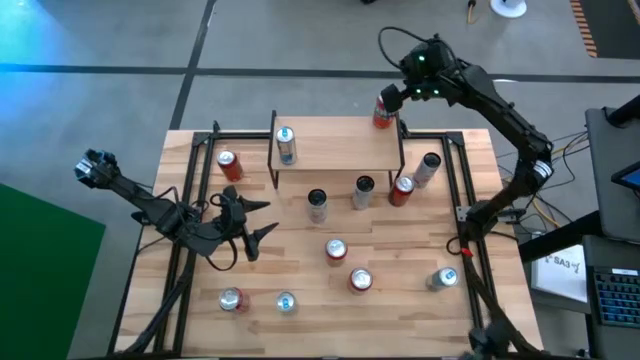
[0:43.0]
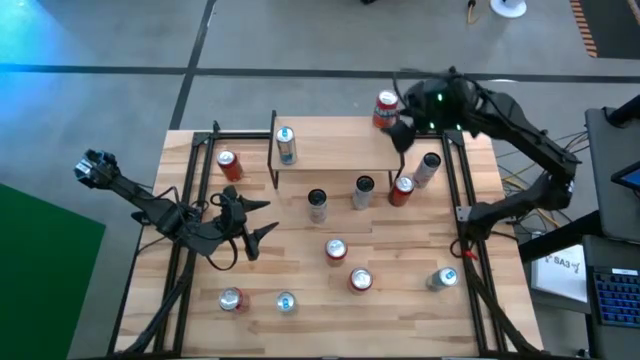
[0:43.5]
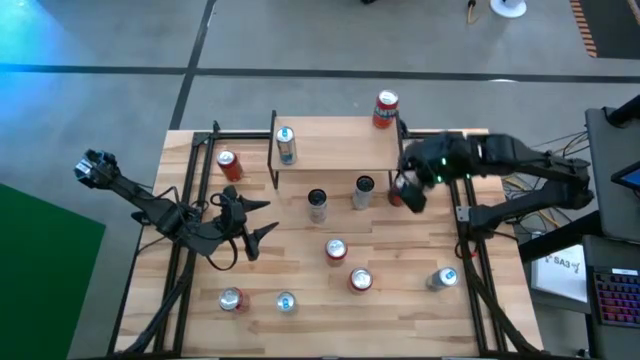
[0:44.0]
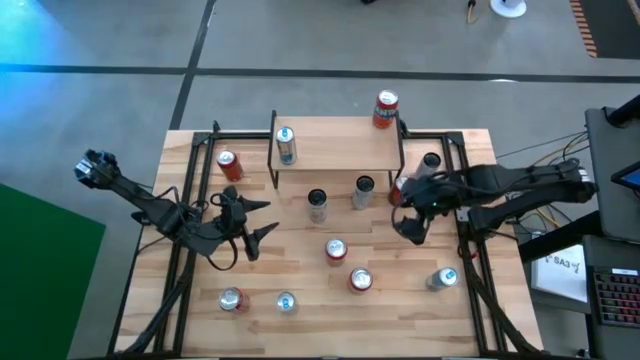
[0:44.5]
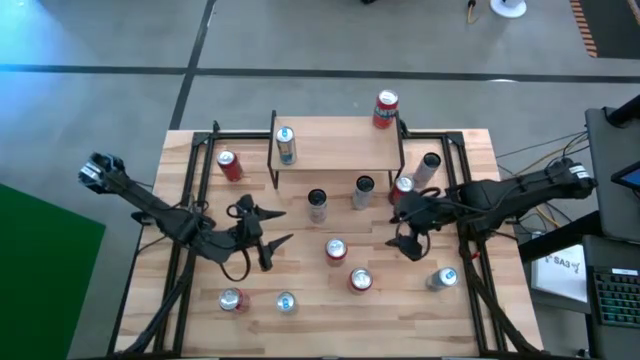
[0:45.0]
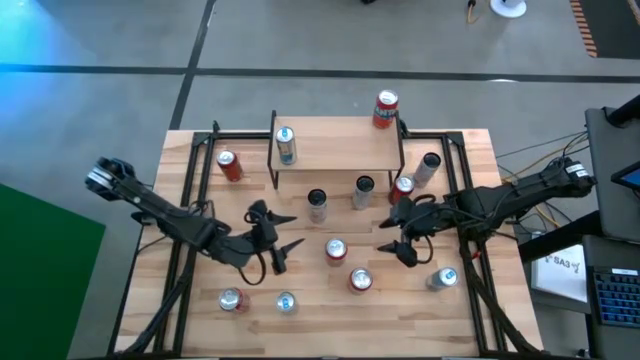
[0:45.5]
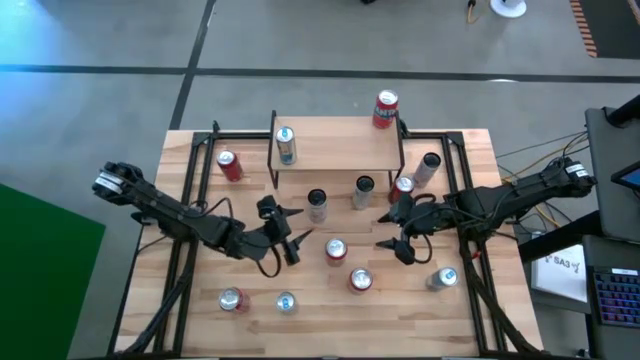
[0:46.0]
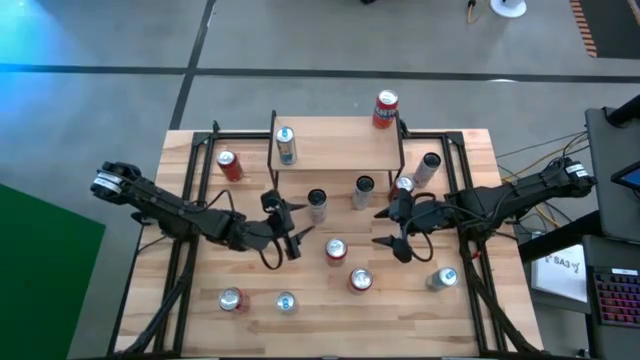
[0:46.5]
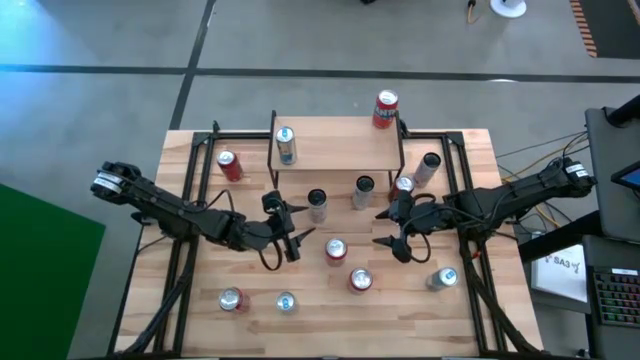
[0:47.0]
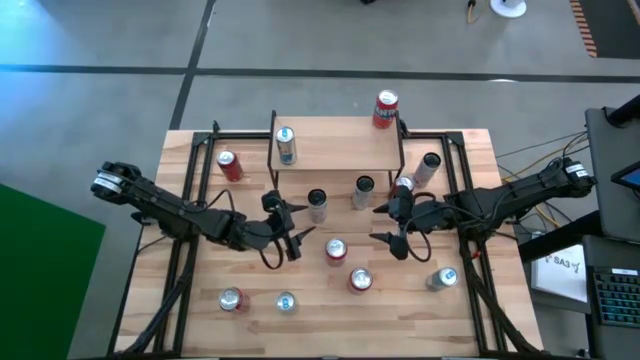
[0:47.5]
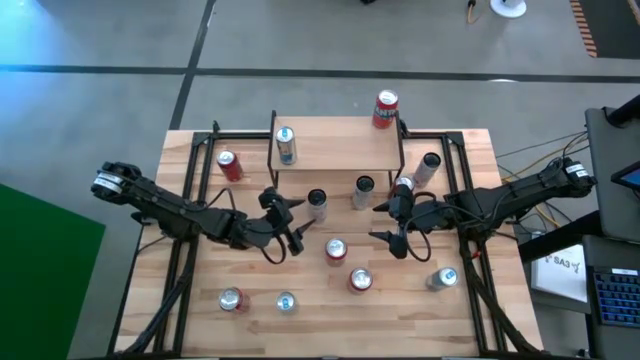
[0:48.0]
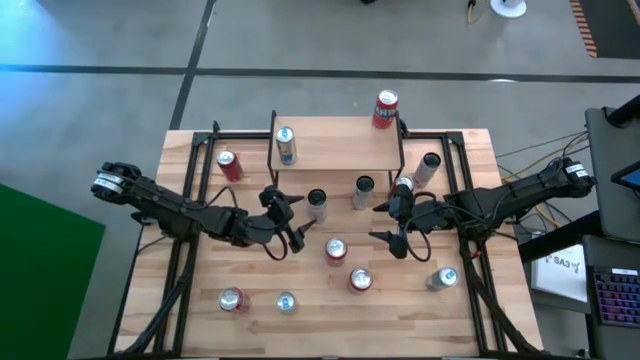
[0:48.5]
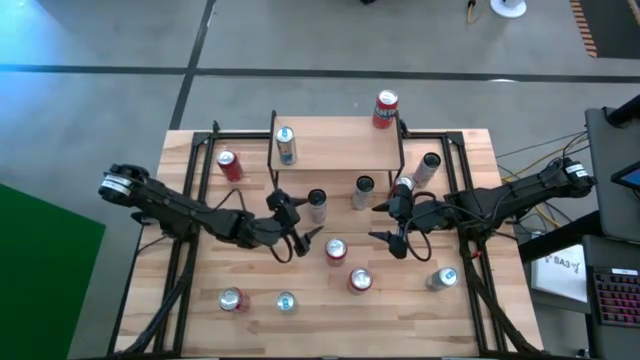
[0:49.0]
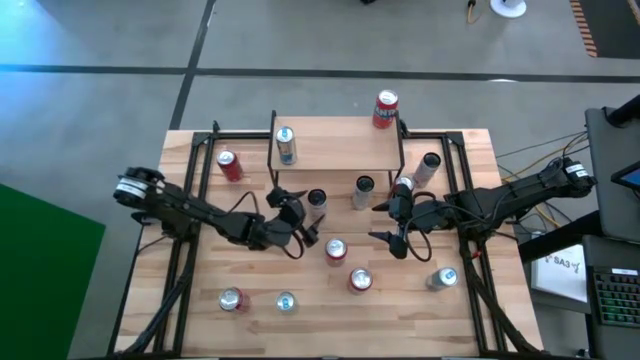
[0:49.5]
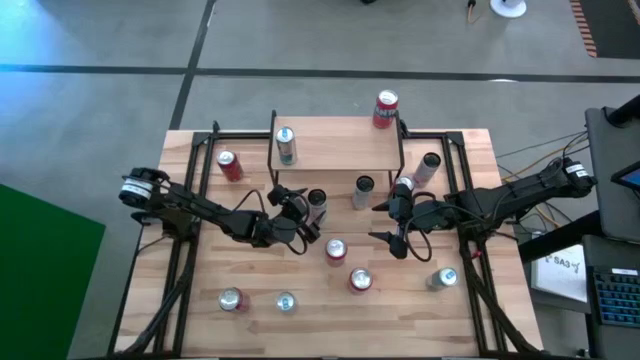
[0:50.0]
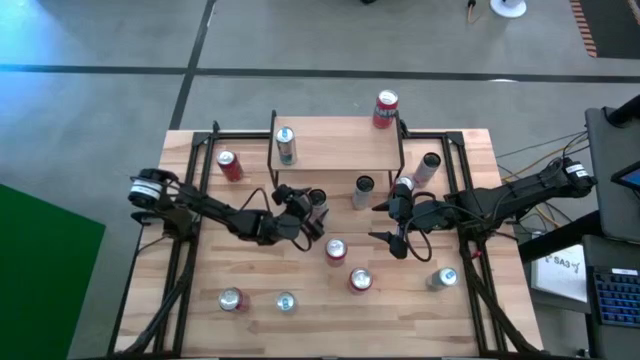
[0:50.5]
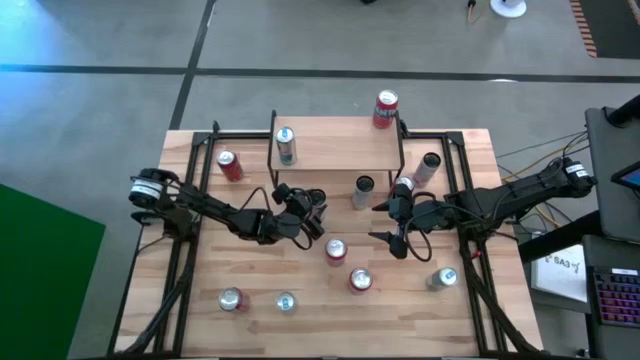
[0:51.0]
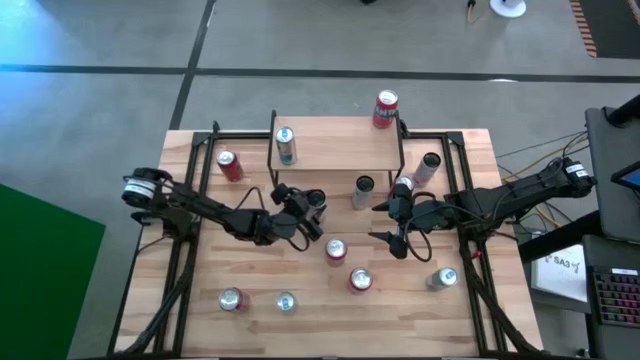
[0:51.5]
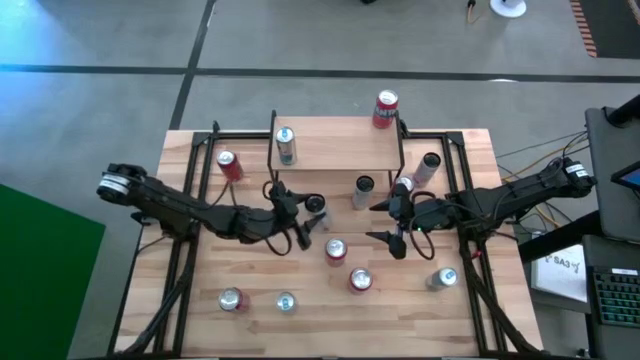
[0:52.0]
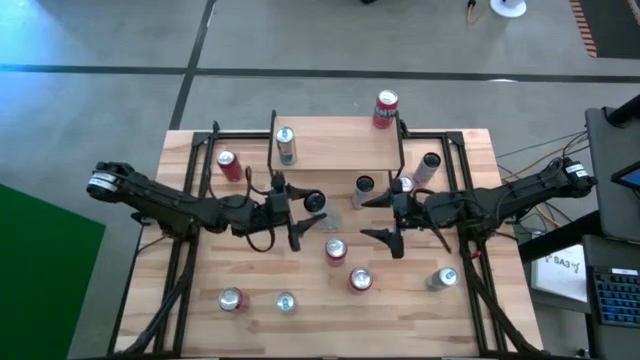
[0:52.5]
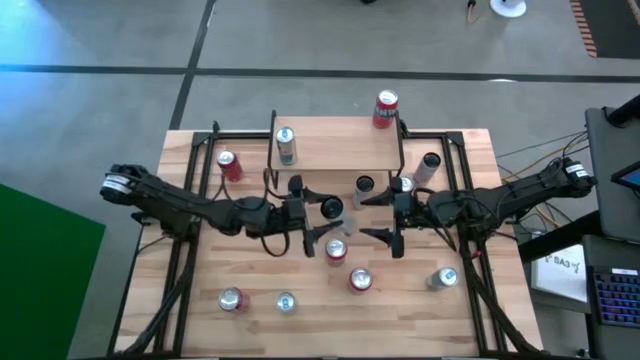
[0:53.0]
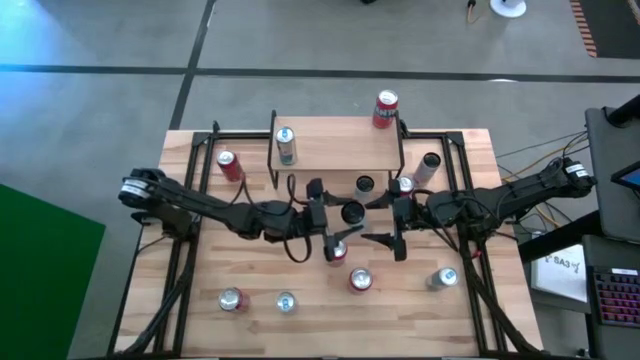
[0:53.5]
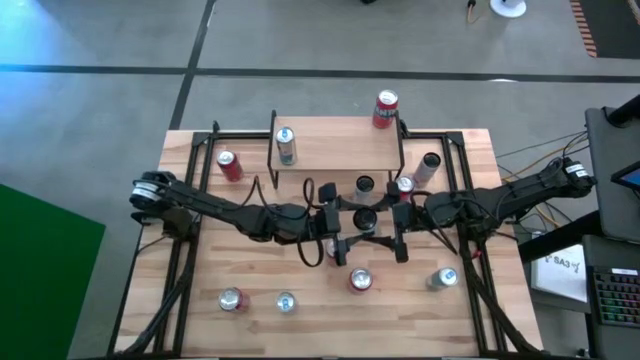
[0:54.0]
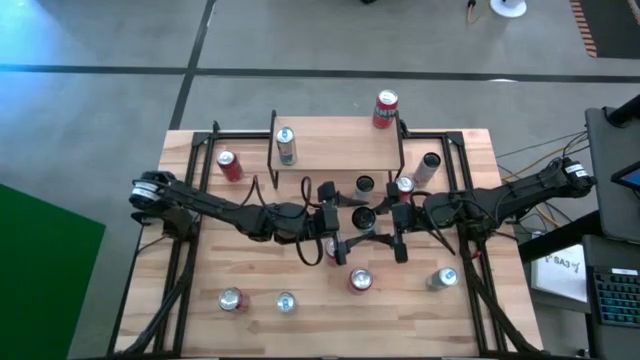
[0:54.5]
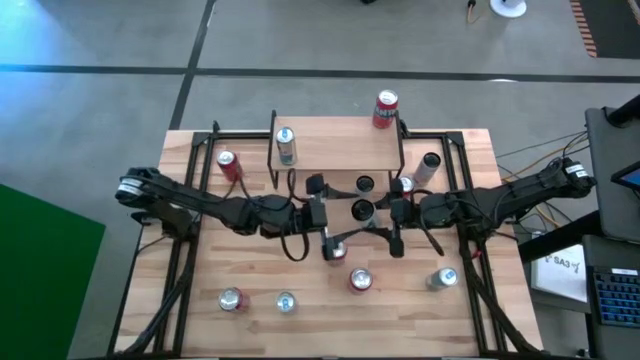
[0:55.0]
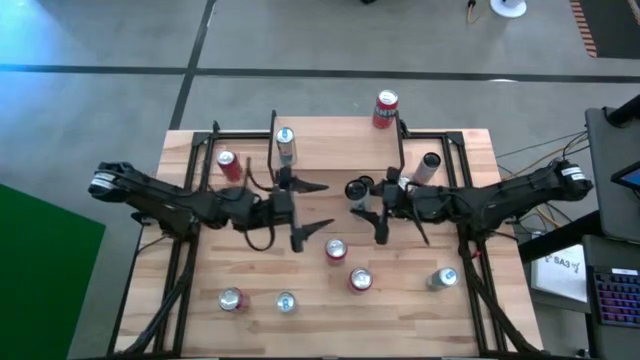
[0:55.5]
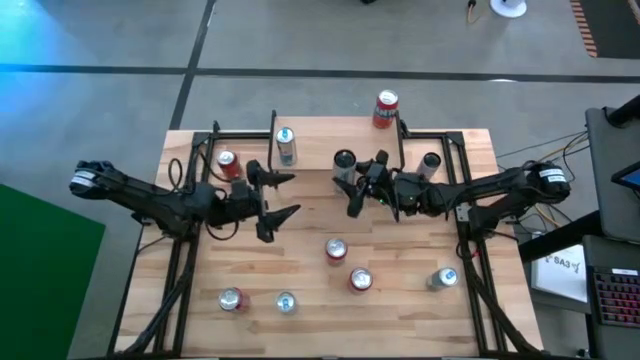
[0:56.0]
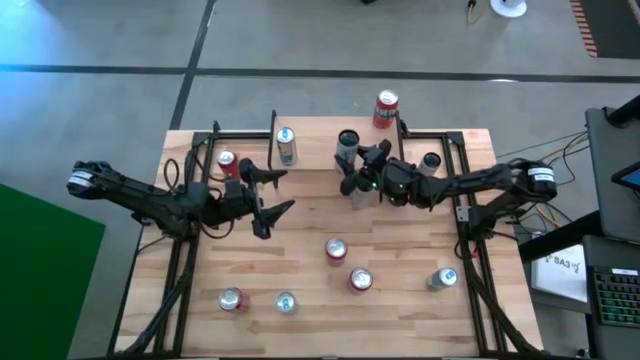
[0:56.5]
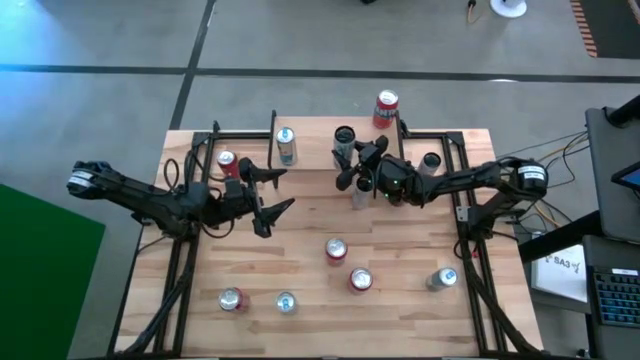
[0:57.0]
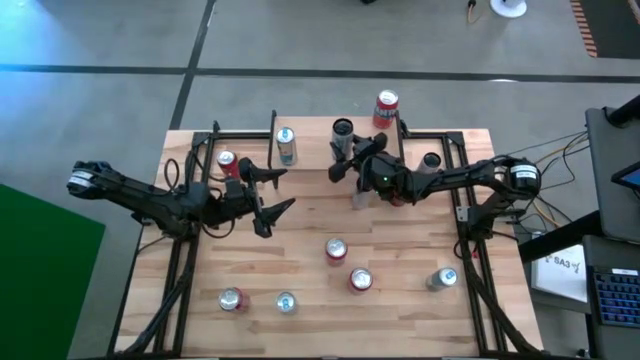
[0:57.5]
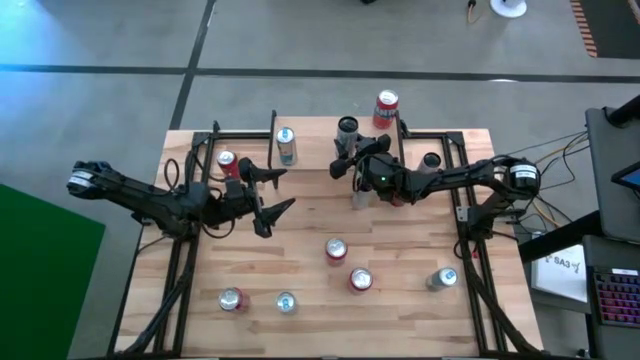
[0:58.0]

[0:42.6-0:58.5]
Task: Place canned beverage on shelf
Put the left white pink soda can on the shelf

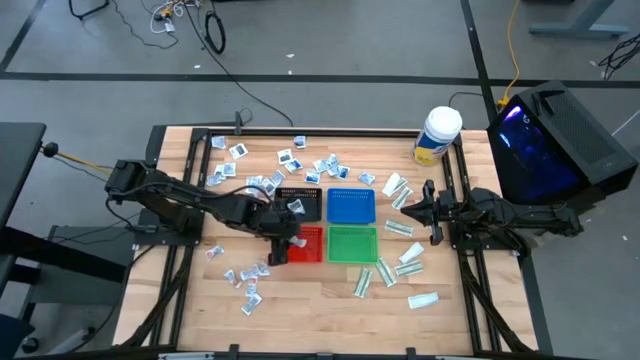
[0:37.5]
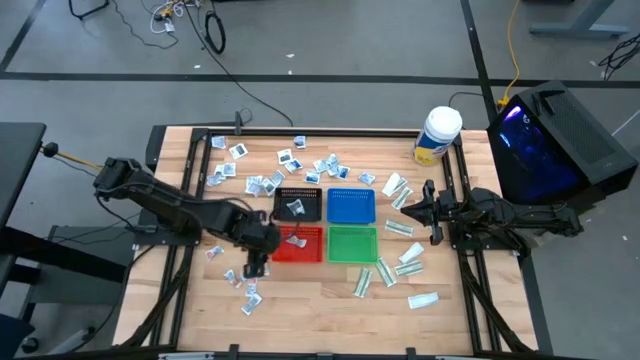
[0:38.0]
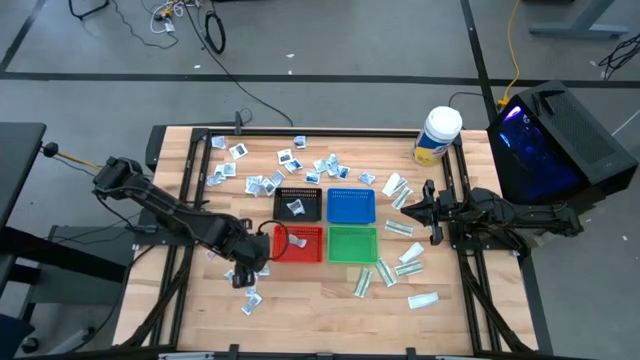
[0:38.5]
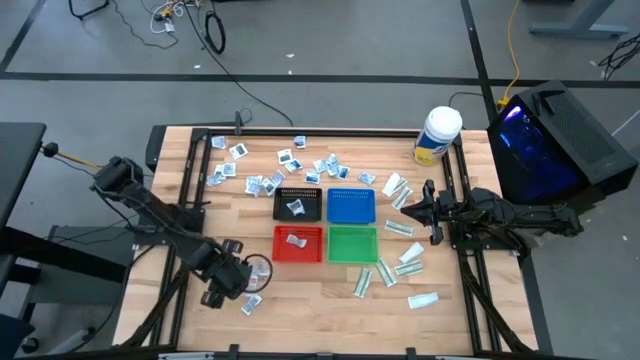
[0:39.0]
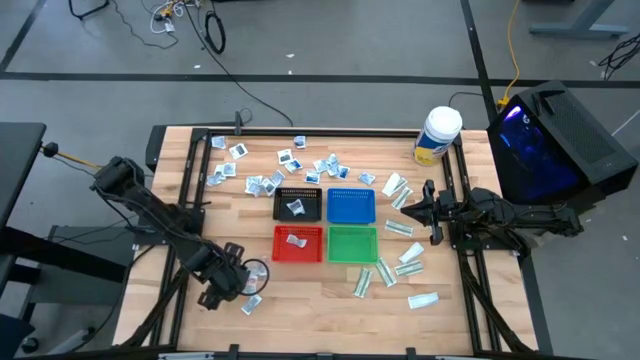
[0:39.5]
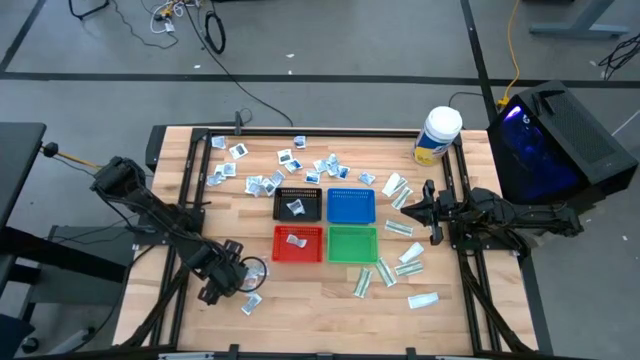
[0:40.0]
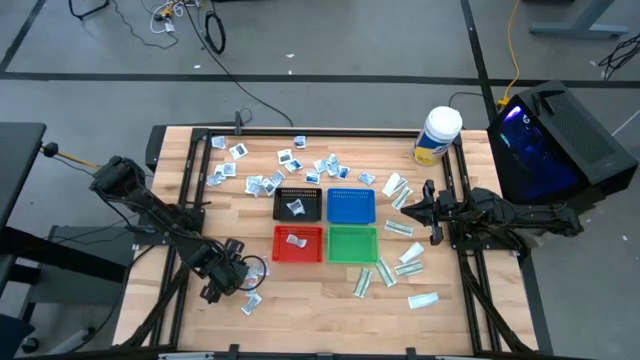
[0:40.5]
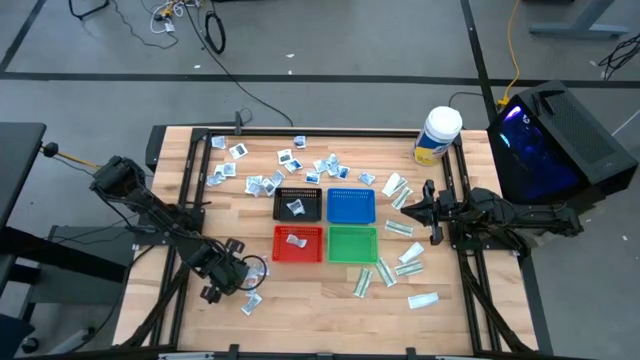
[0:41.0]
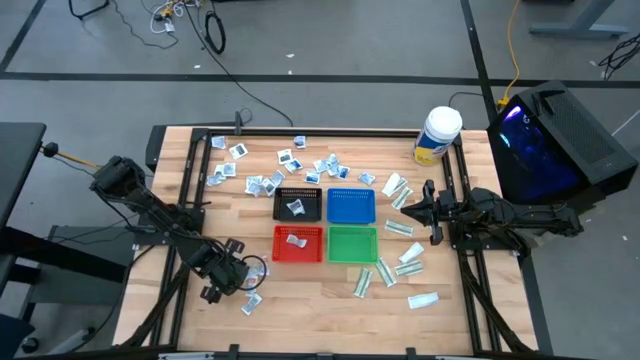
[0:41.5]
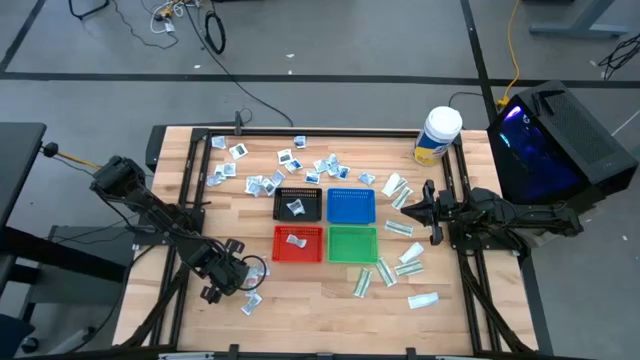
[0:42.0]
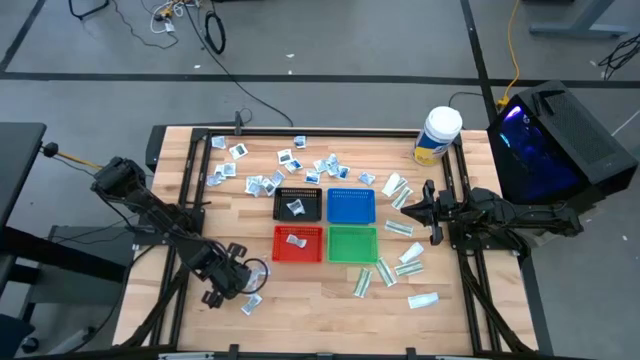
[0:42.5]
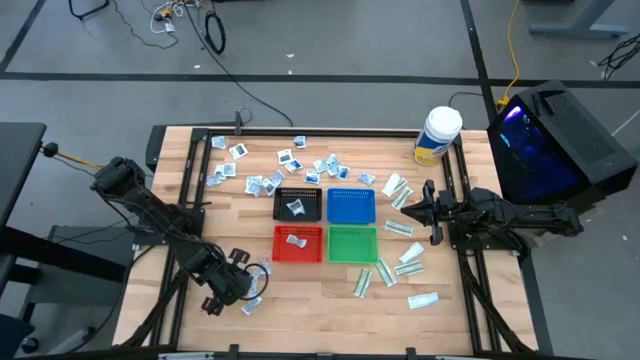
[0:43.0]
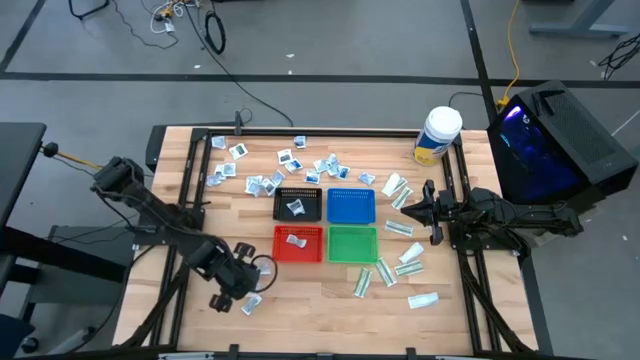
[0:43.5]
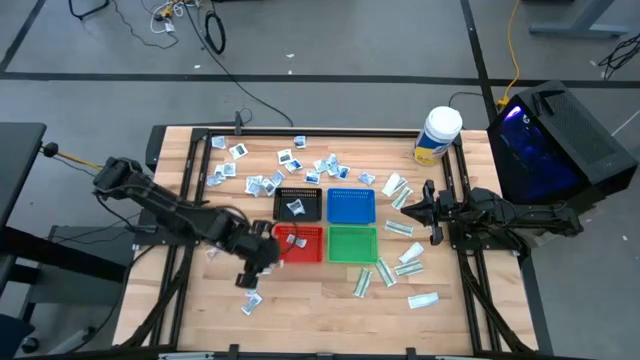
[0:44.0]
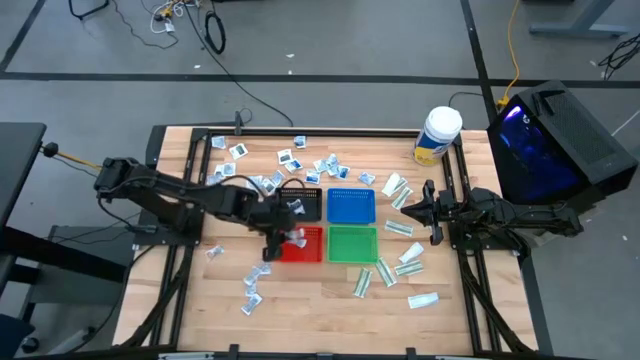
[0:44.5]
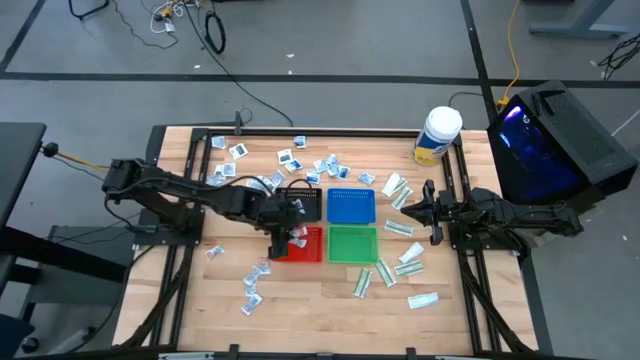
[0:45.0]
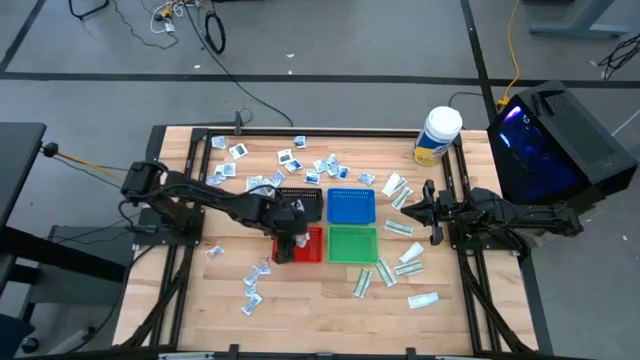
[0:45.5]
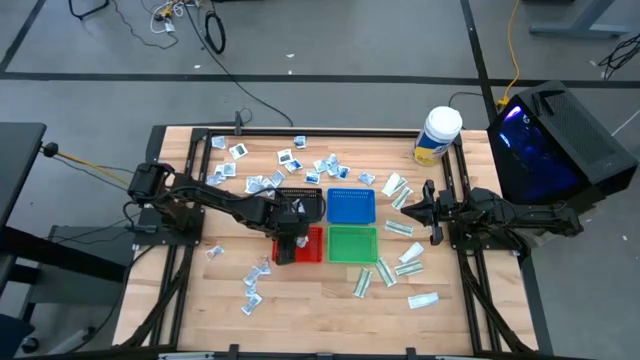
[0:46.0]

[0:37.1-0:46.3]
Task: Pick & Place First Aid Supplies
Put the orange ointment pack into the orange bin
